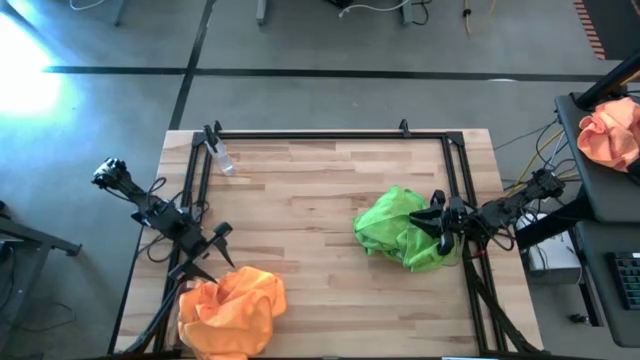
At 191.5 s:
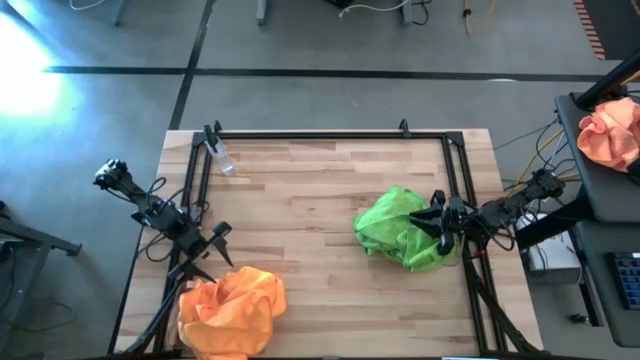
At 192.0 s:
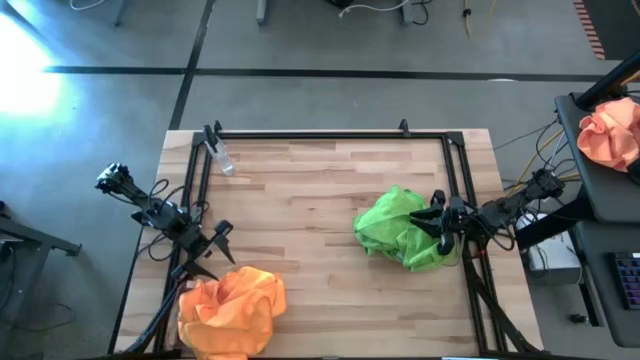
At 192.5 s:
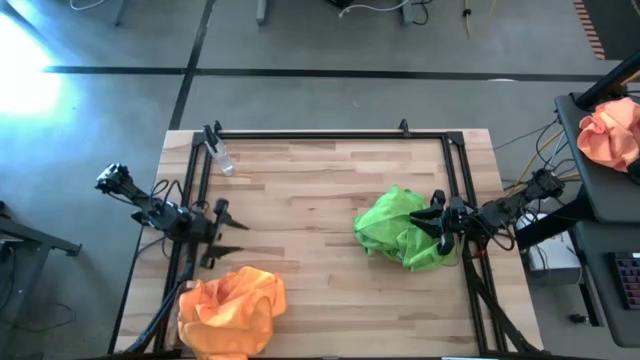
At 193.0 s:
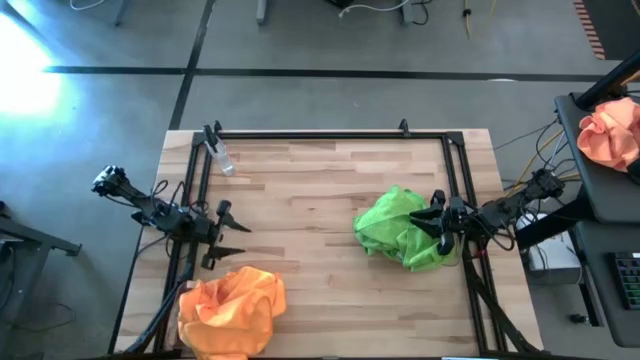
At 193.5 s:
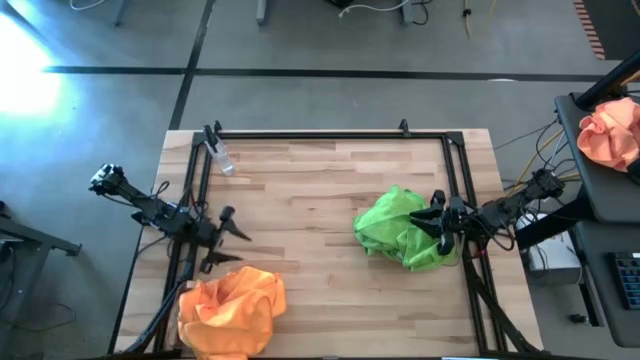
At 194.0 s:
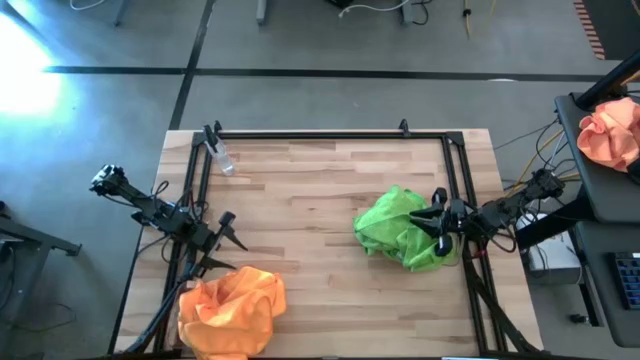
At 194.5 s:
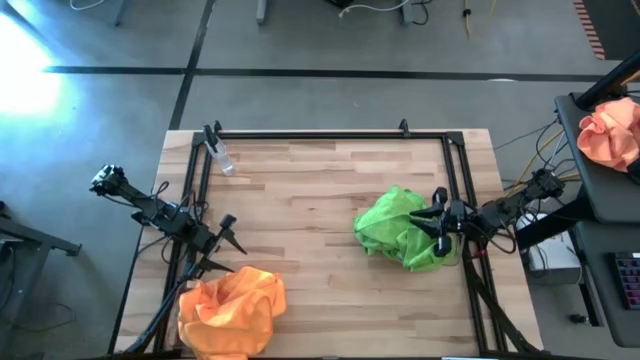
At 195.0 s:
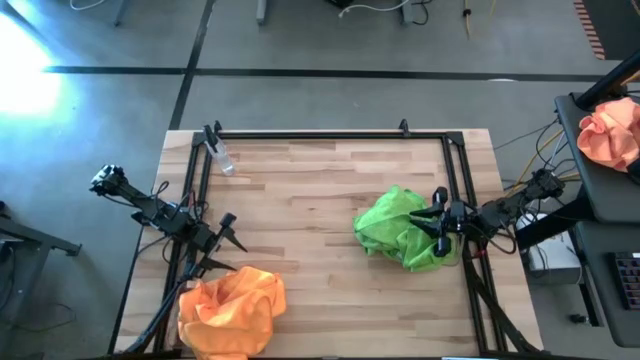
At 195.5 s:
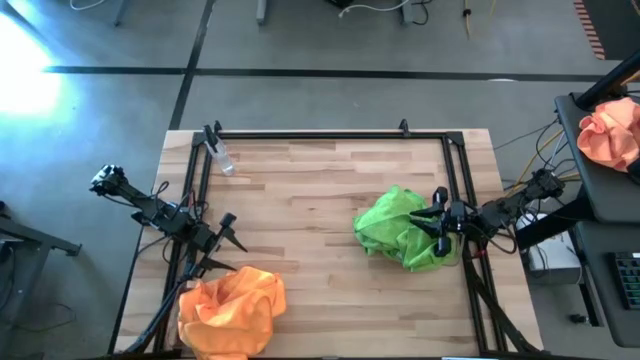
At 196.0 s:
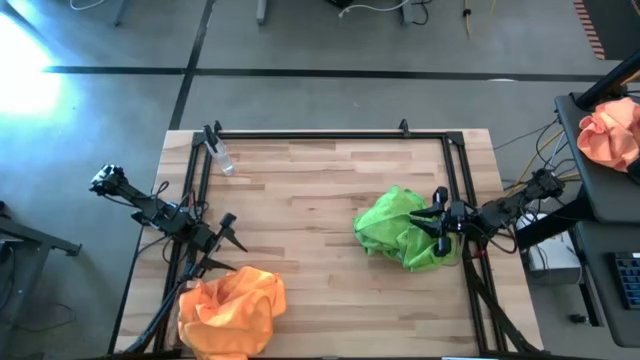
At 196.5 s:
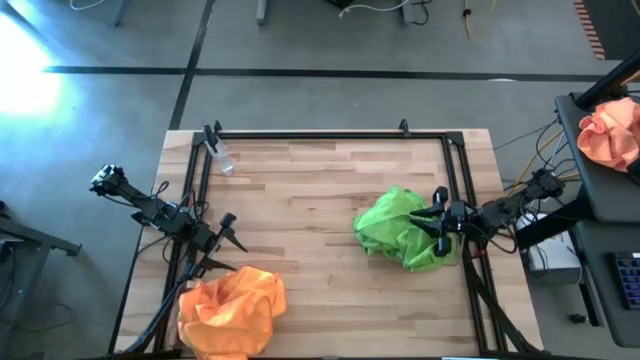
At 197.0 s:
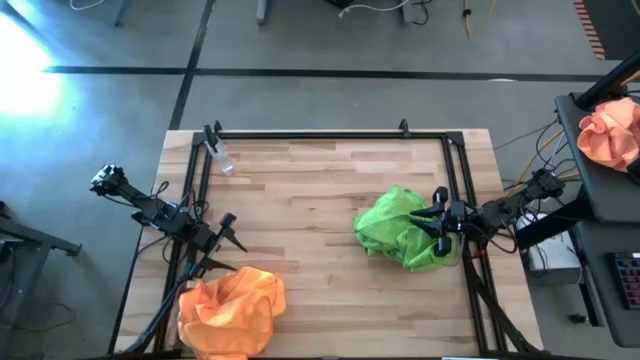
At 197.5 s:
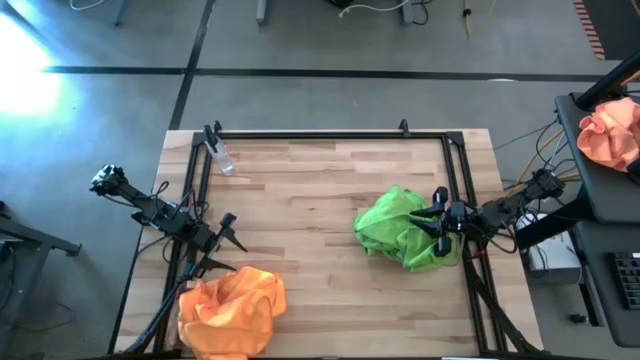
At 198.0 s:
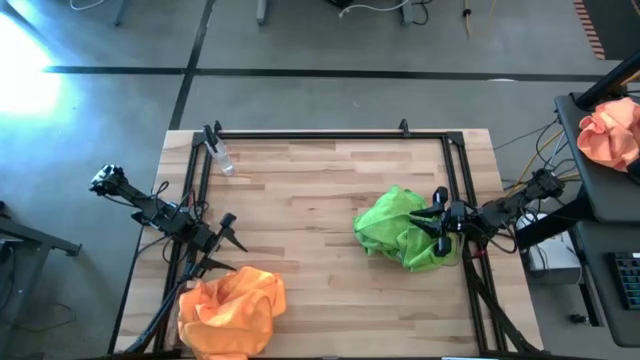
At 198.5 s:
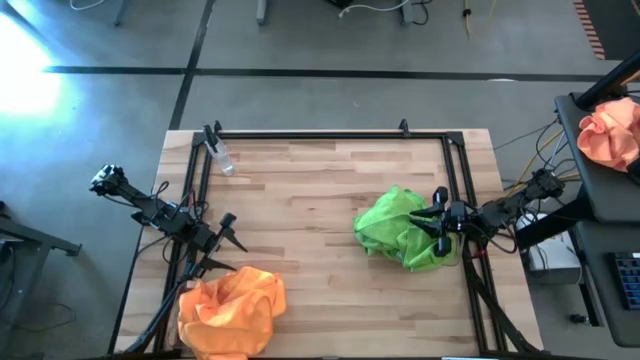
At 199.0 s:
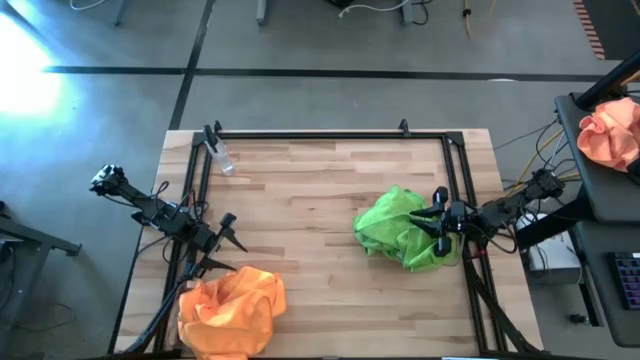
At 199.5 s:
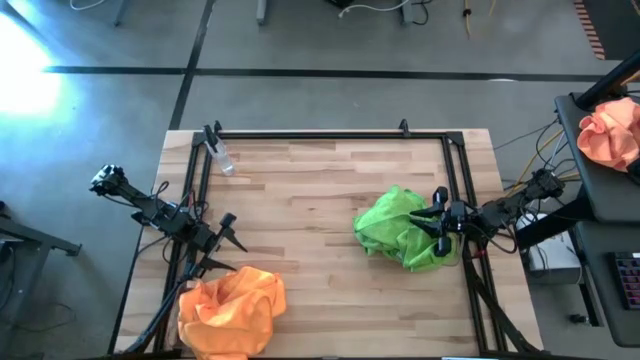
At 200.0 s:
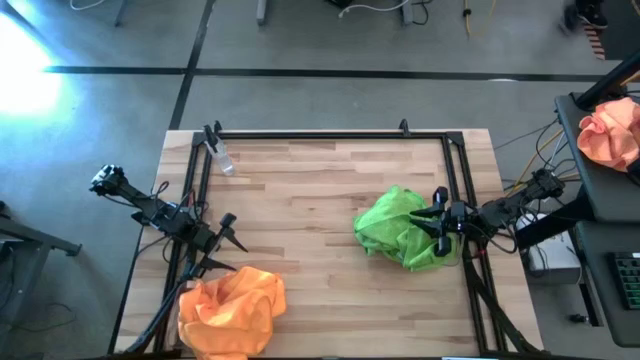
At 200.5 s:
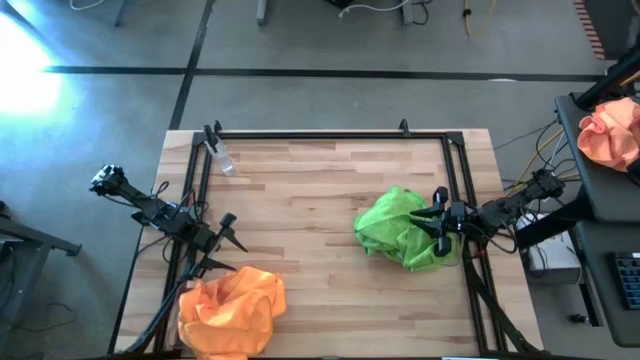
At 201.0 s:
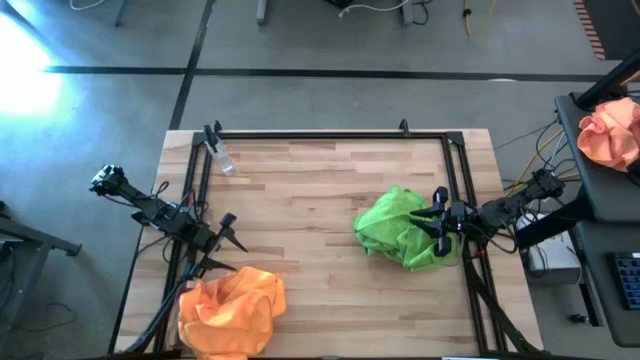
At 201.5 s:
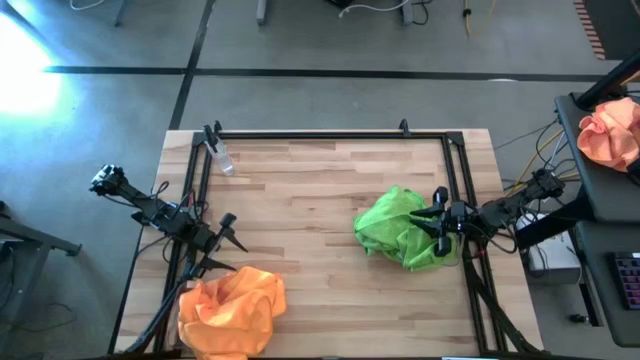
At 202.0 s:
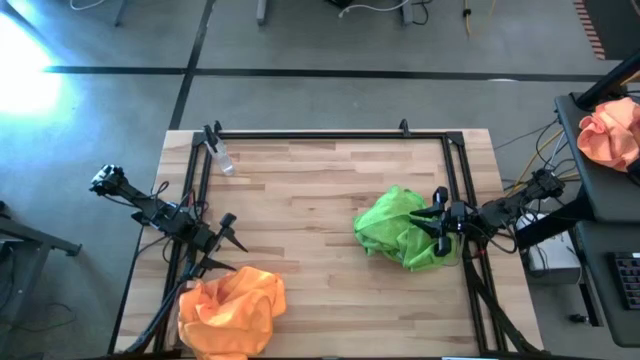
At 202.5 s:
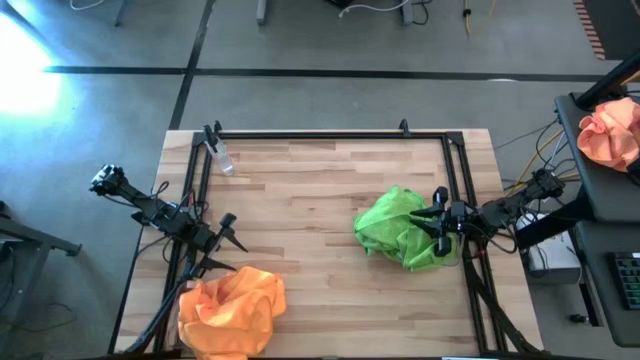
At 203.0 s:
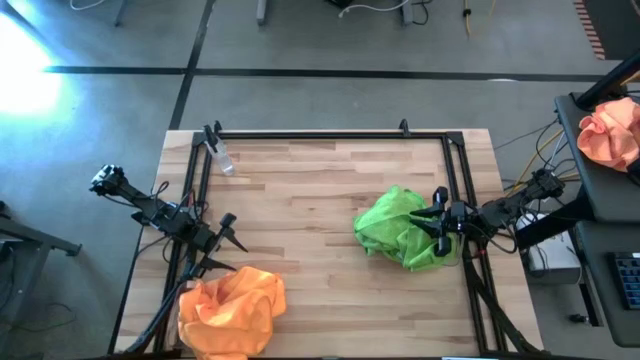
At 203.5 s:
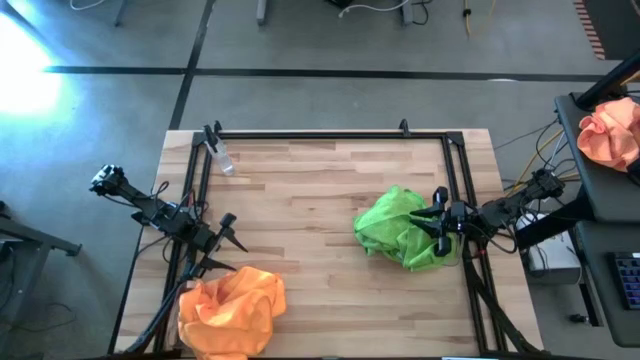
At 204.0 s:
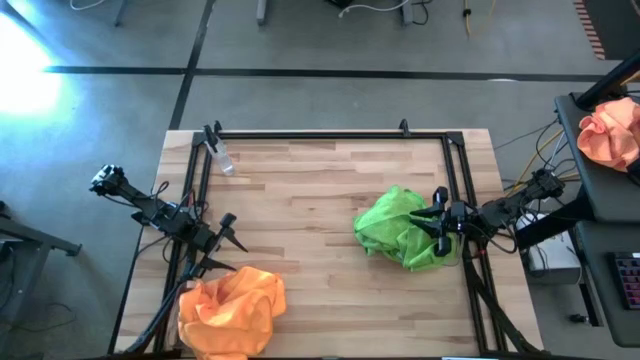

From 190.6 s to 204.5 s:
Task: Sort microfiber towel by color & place in baskets
Return to Home Position

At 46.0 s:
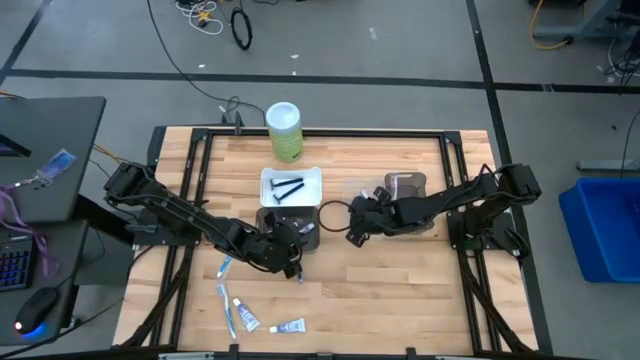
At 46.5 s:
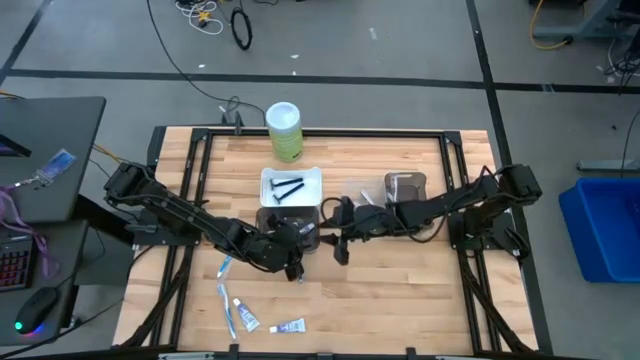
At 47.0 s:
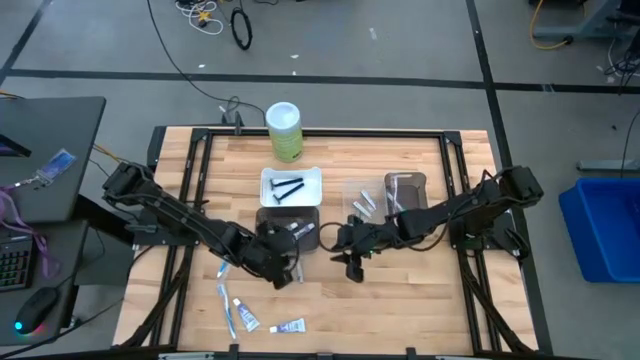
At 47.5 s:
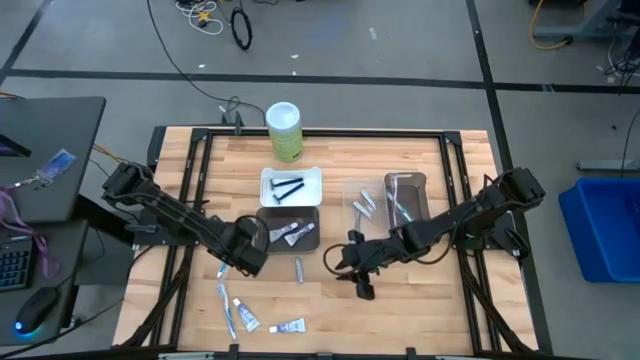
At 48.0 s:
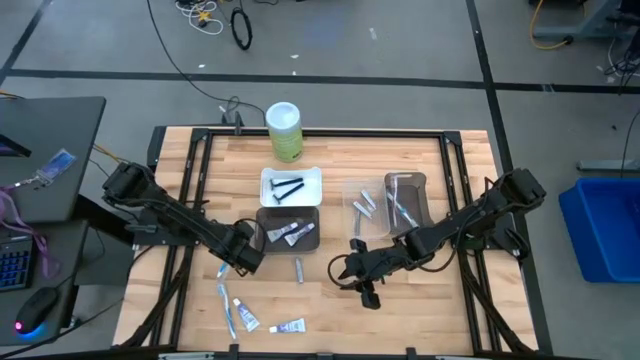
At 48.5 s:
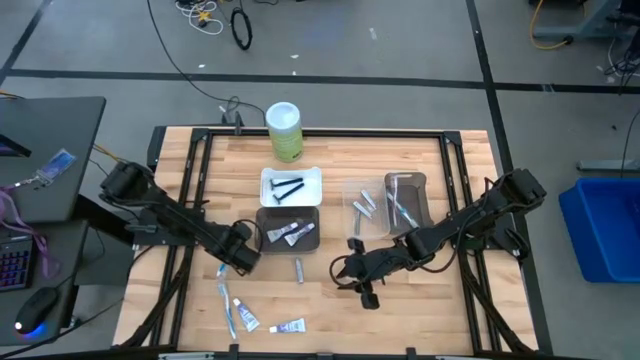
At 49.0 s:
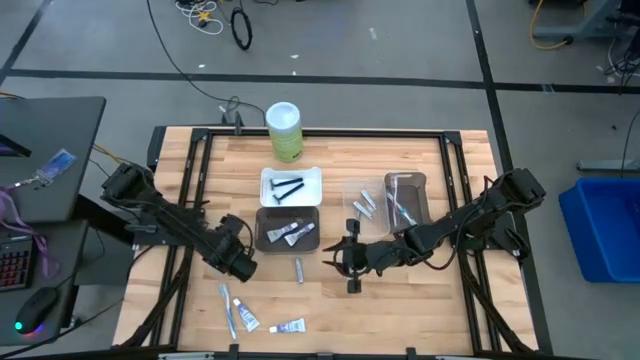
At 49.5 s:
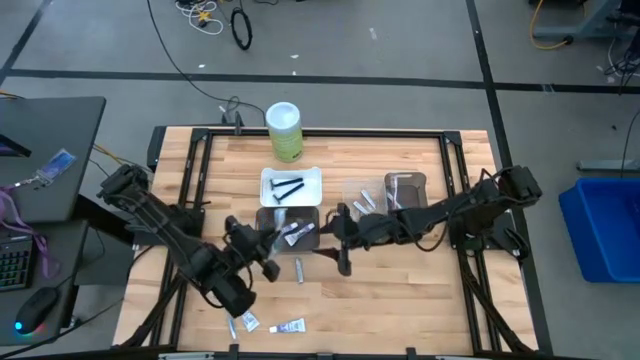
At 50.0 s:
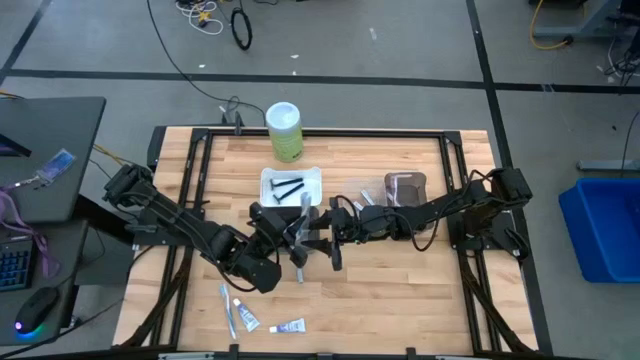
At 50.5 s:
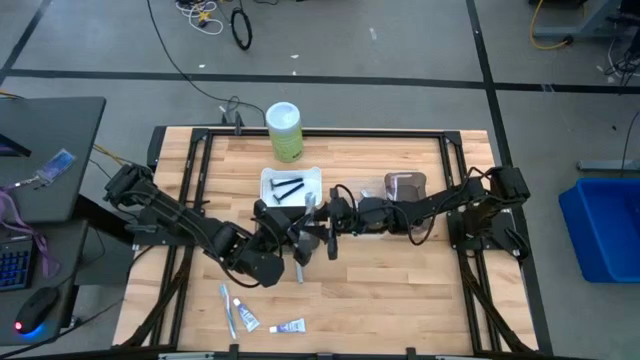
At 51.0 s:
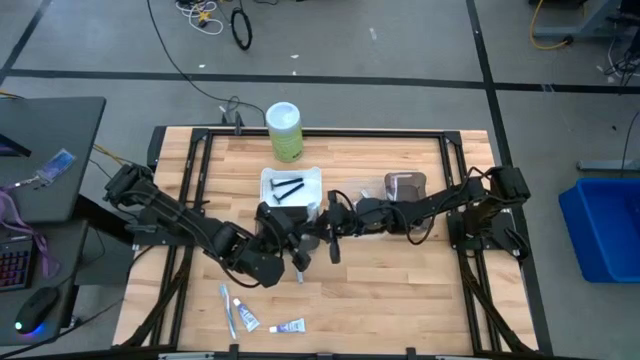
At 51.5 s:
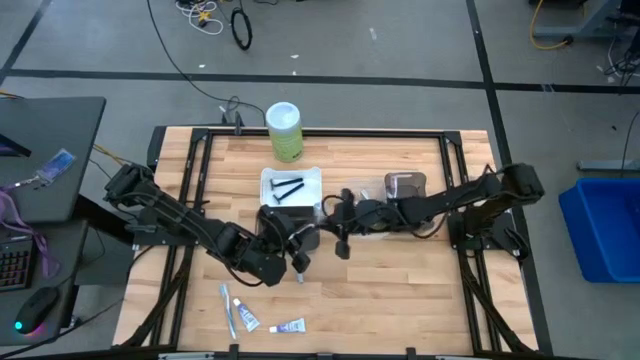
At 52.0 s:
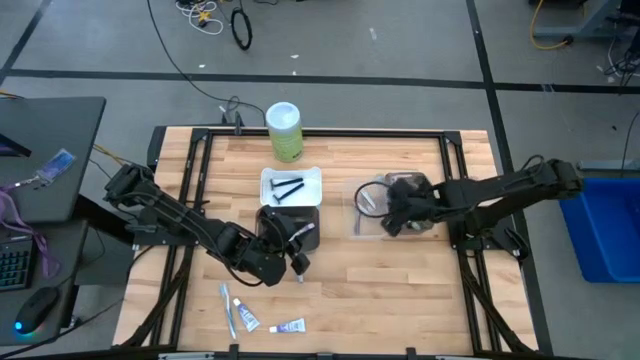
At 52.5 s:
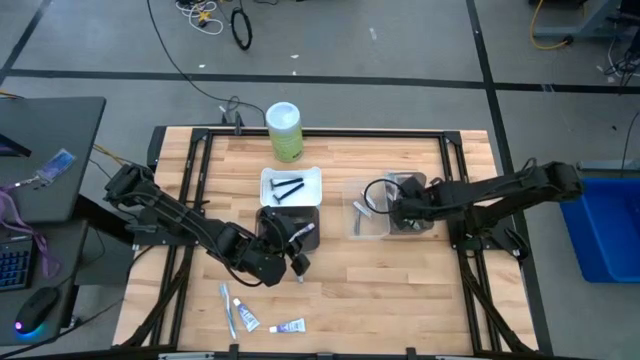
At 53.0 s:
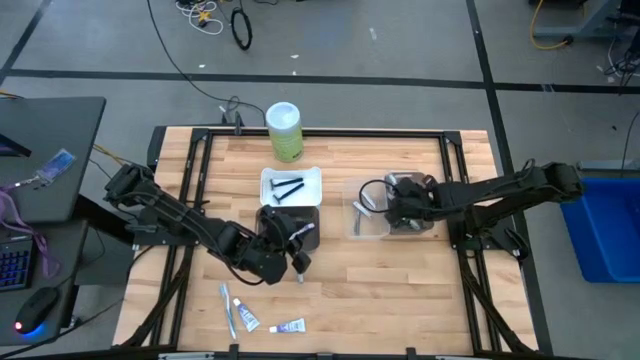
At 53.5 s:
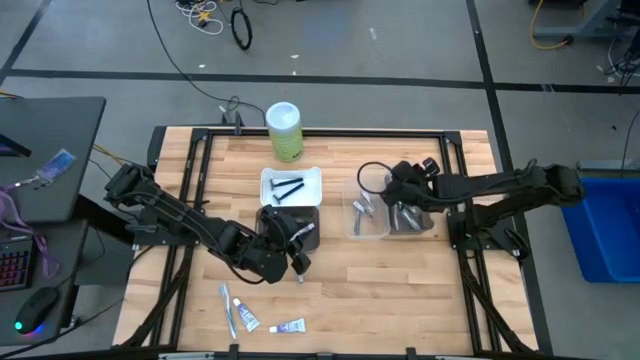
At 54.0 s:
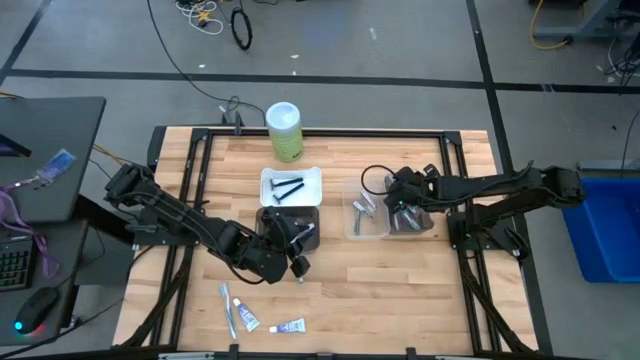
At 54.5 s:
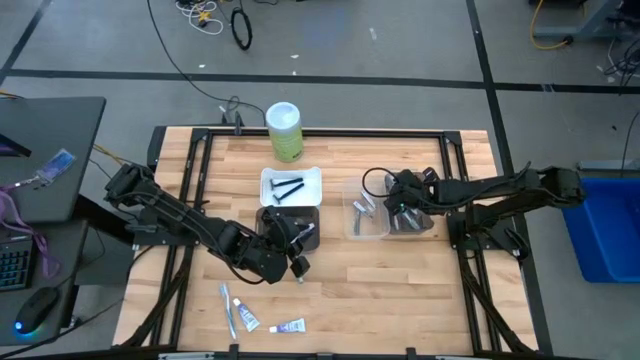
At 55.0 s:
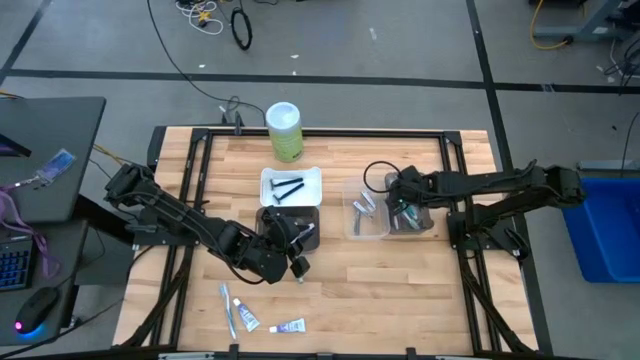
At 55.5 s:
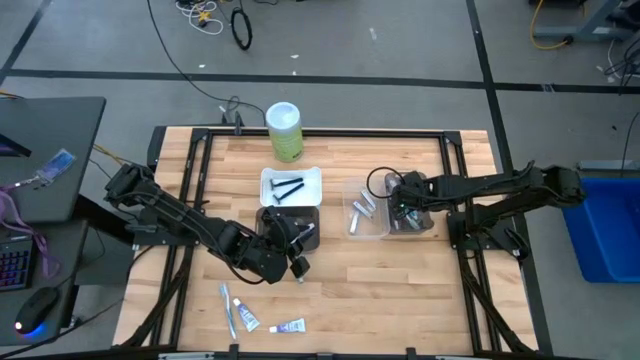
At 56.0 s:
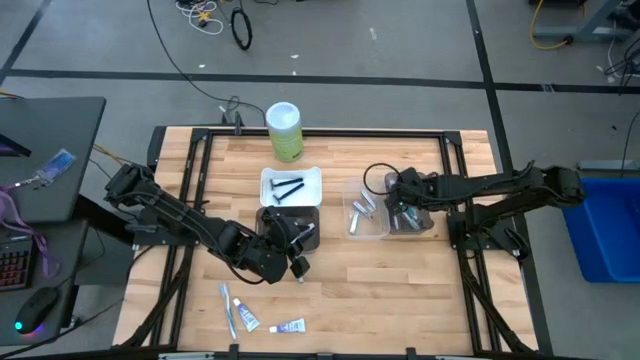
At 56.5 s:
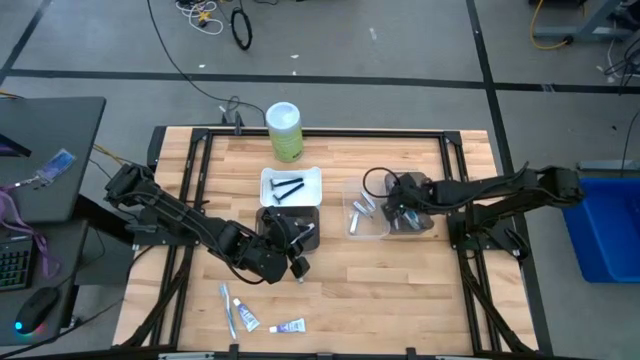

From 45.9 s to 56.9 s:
Task: Pick & Place Travel size toiletries
Put the blue toothbrush into the right black bin
